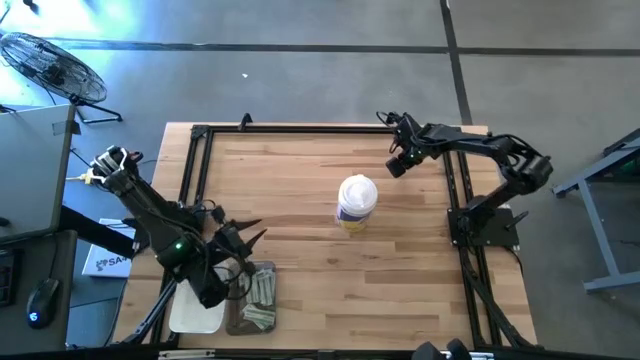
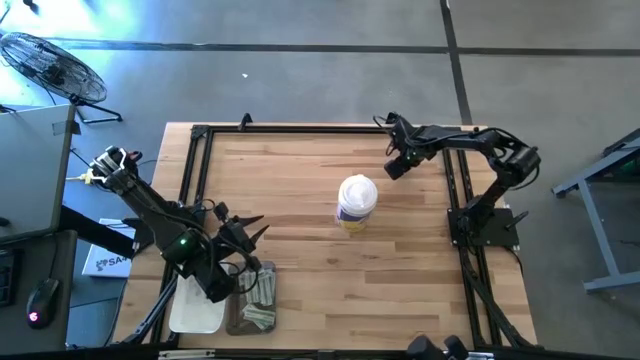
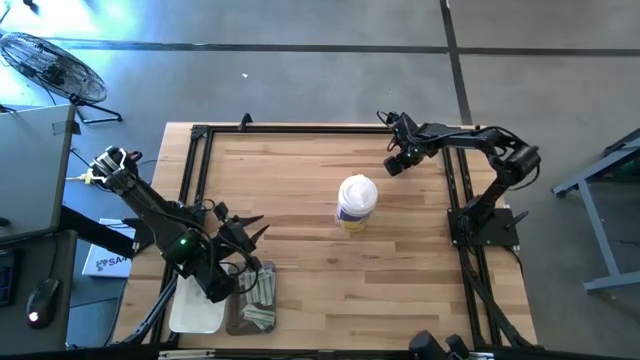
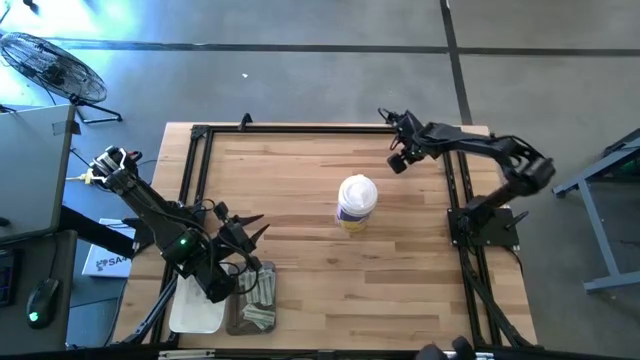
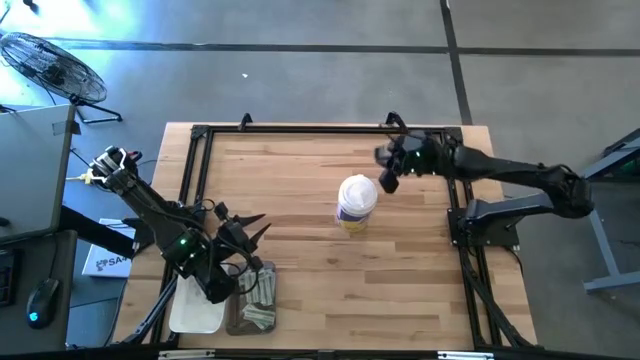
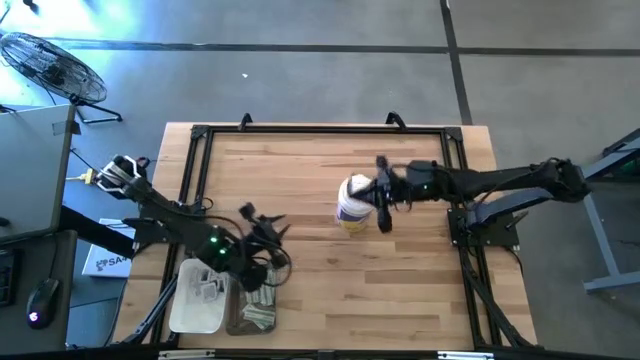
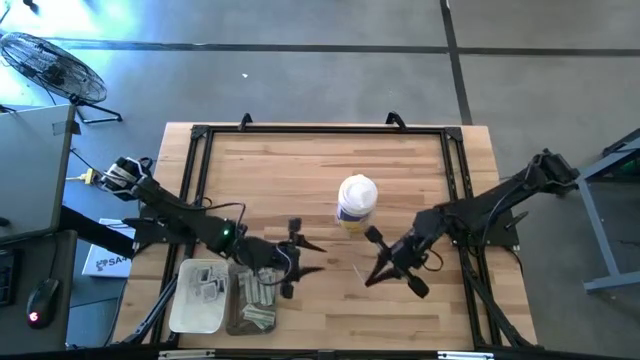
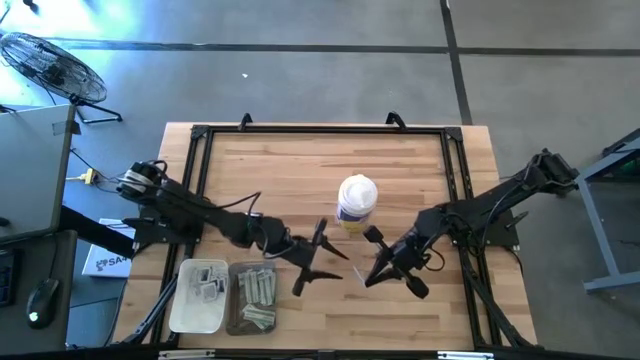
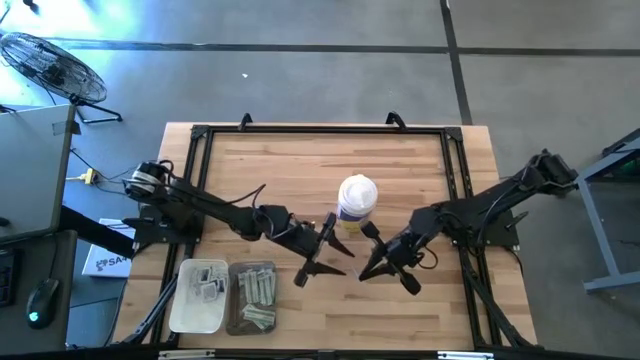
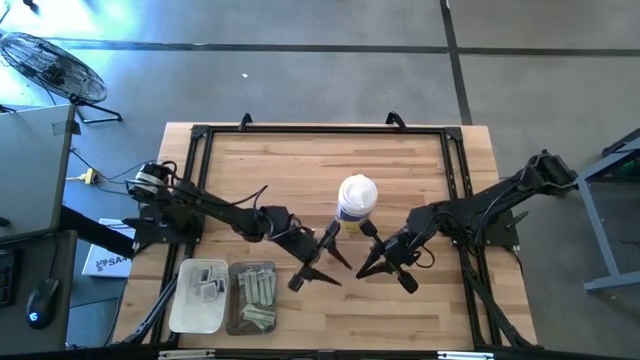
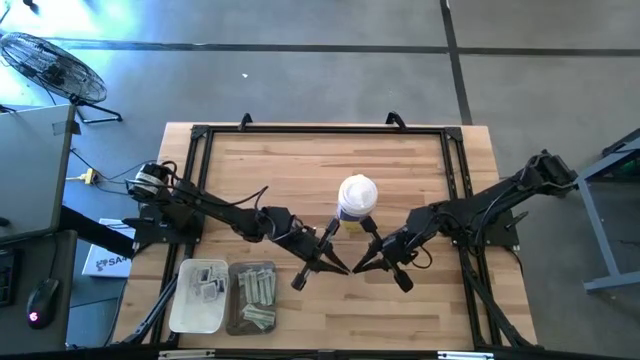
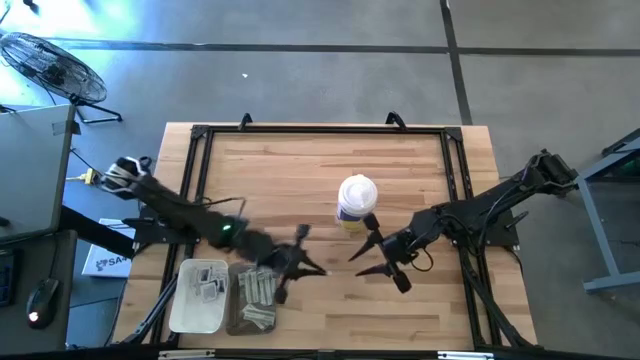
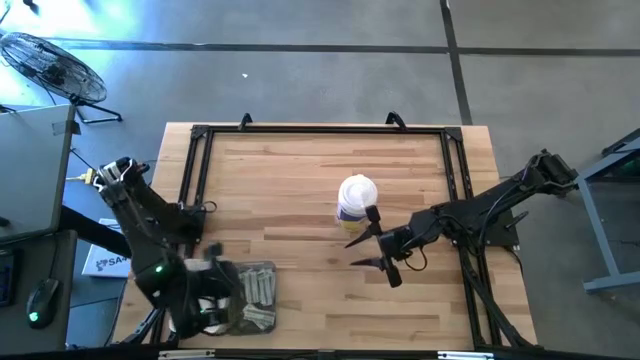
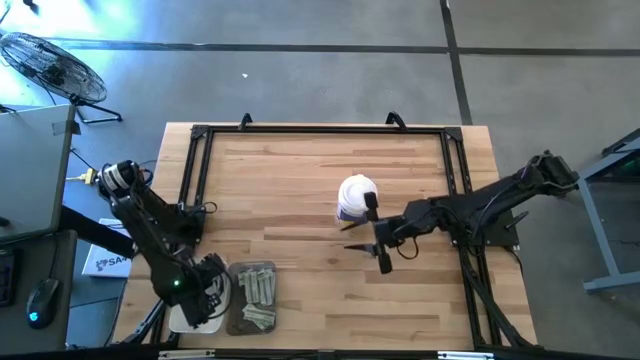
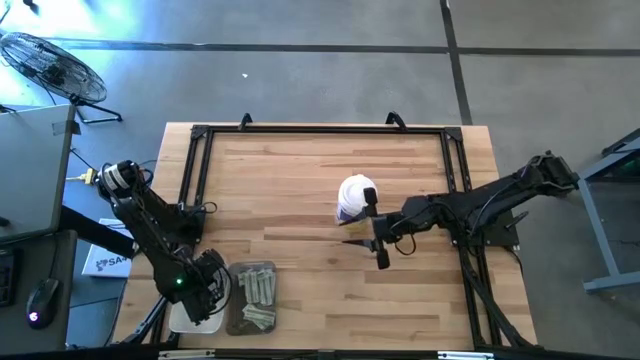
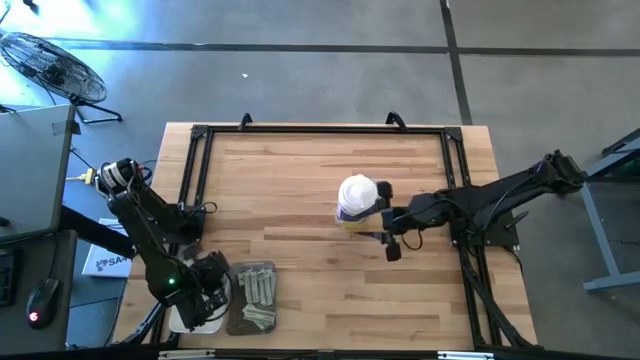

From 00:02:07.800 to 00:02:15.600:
Task: Pick & Place First Aid Supplies
Put the alcohol pad into the white bin

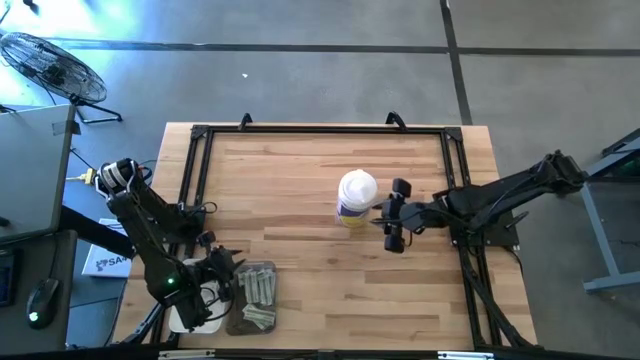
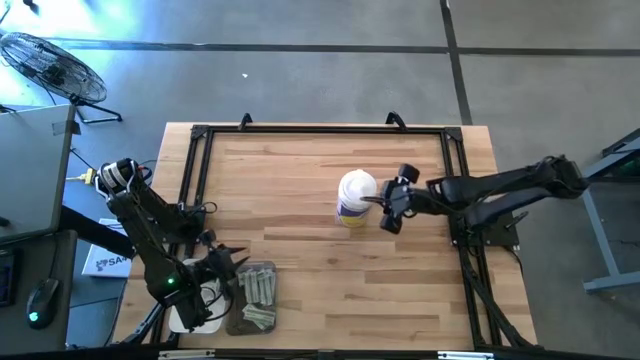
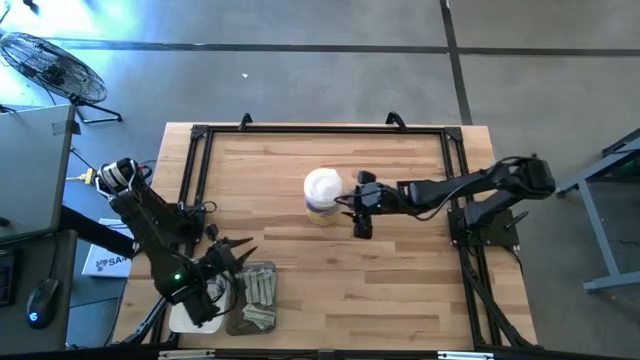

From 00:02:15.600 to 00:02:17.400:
Move the cylindrical object to the center

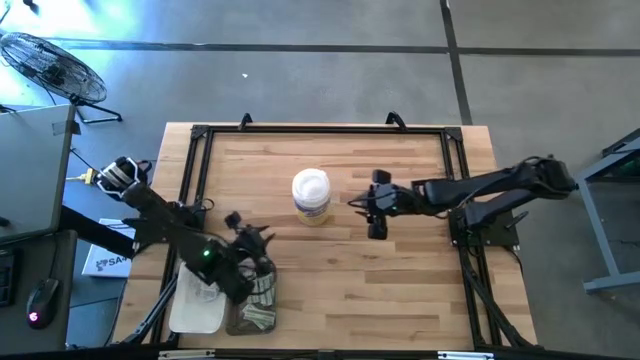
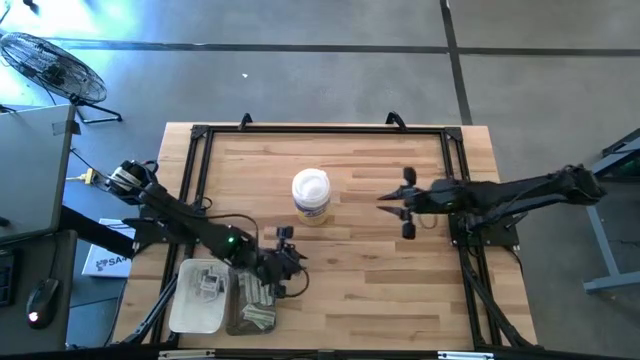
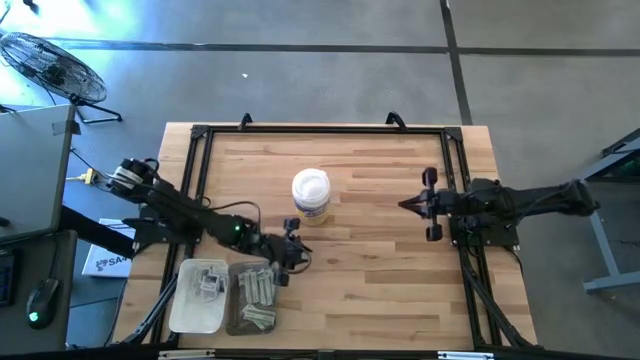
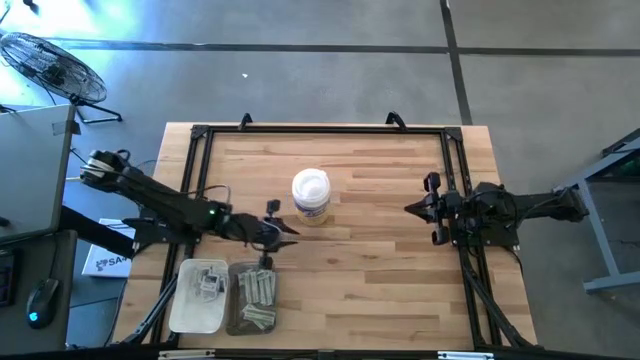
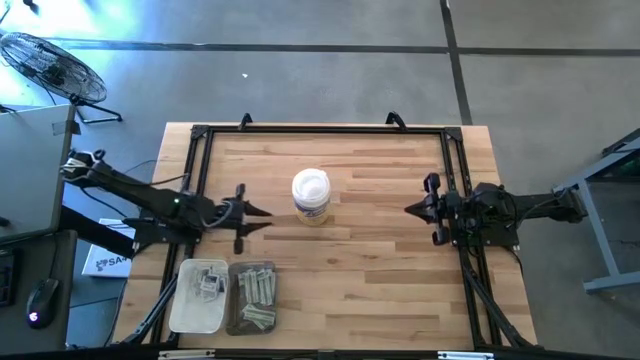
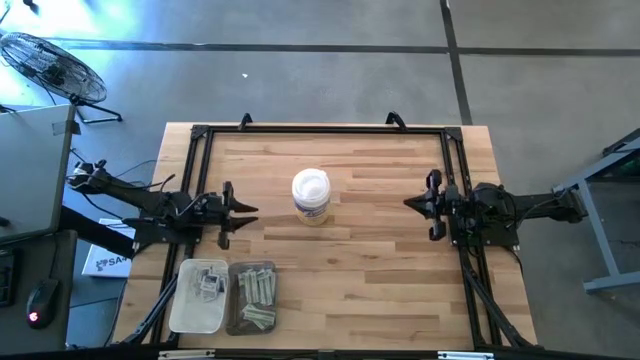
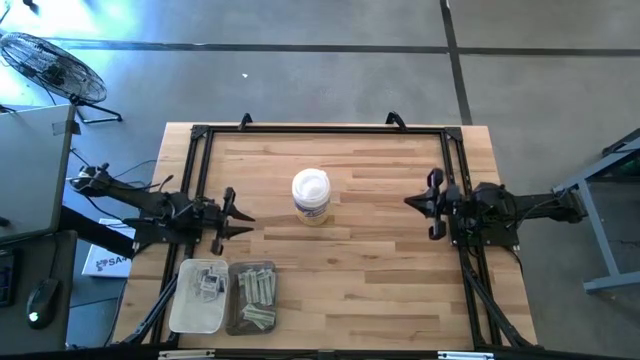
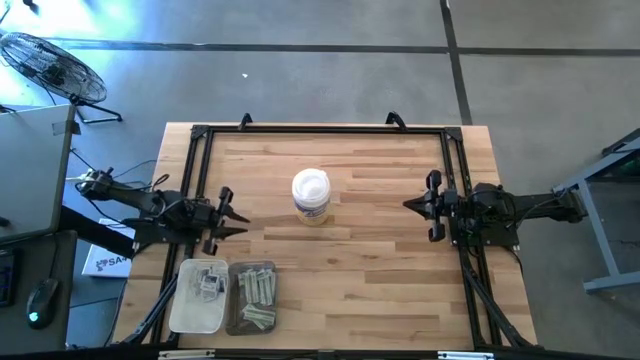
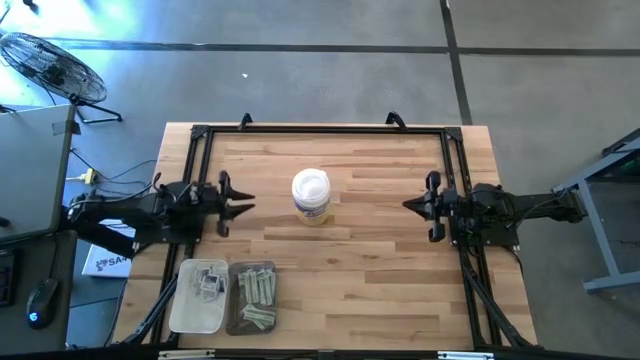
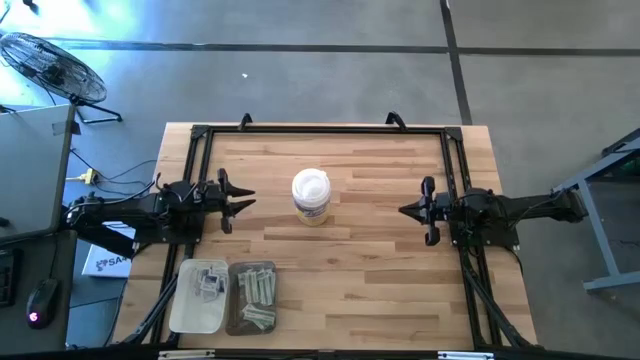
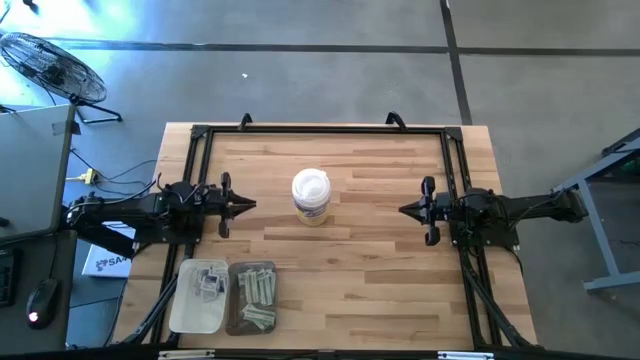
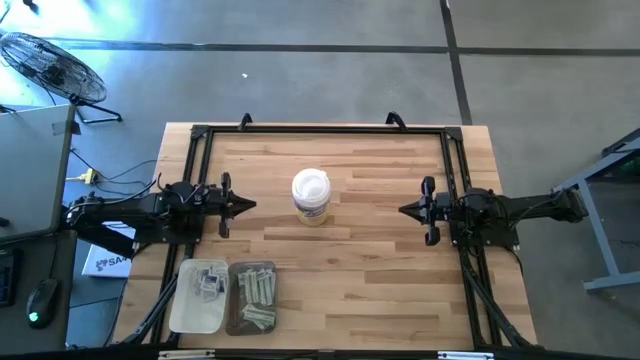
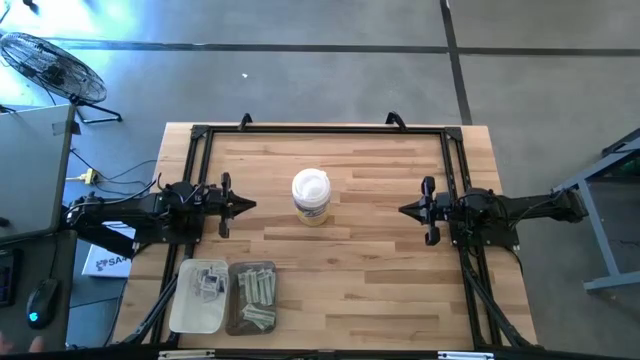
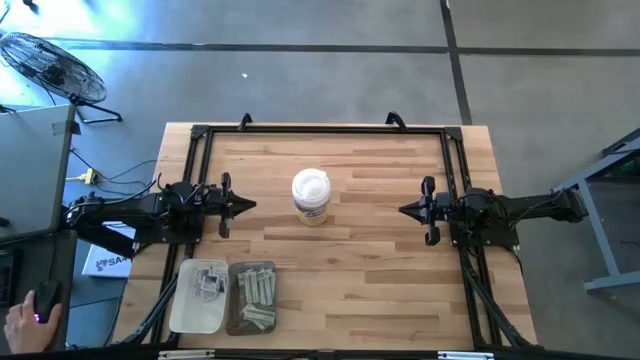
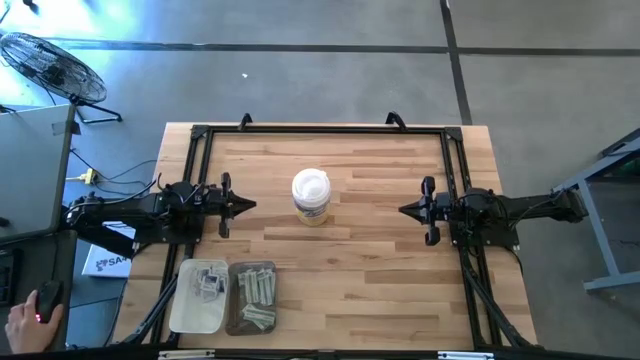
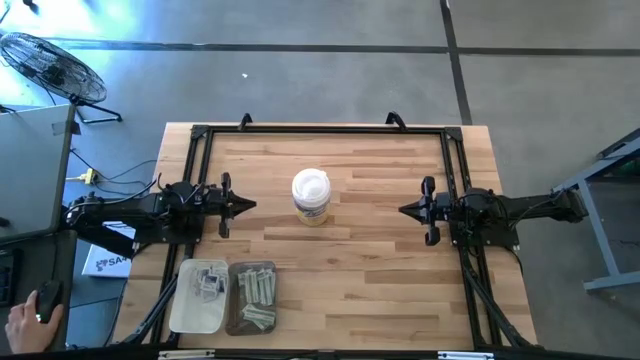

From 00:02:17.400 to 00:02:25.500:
Return to Home Position

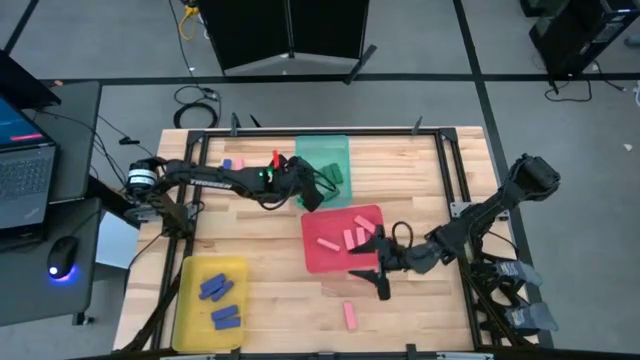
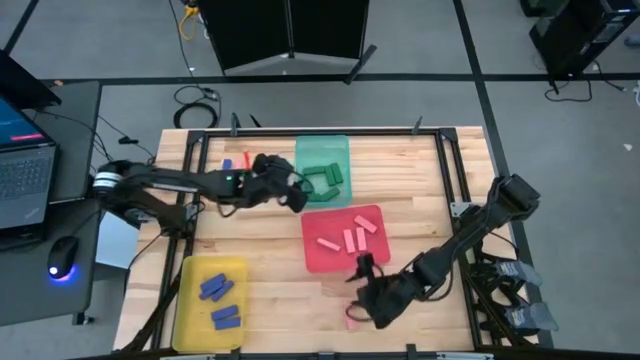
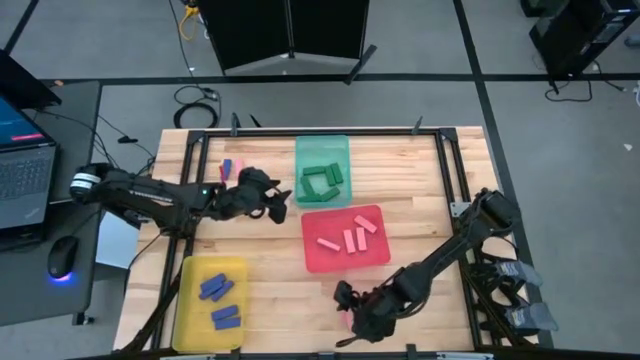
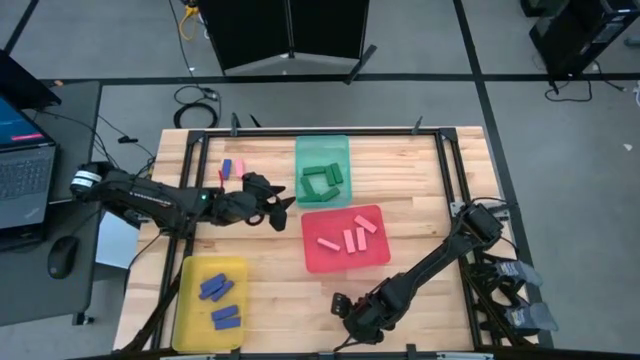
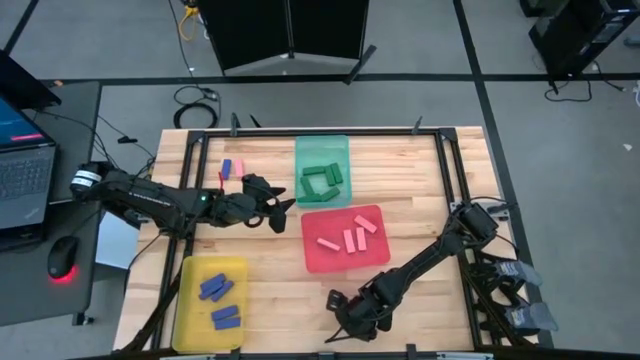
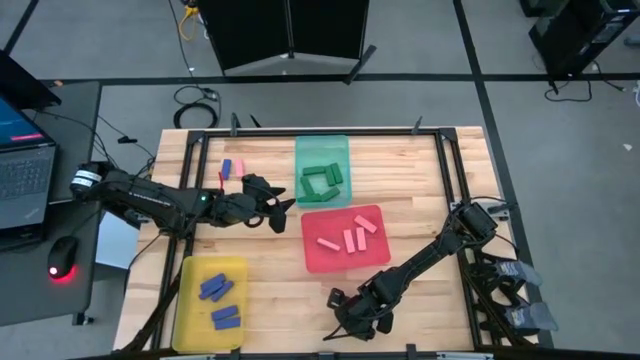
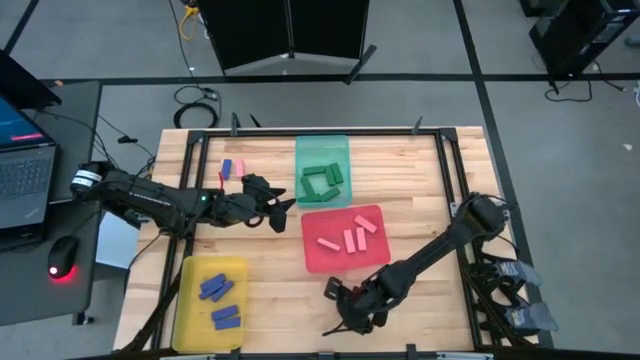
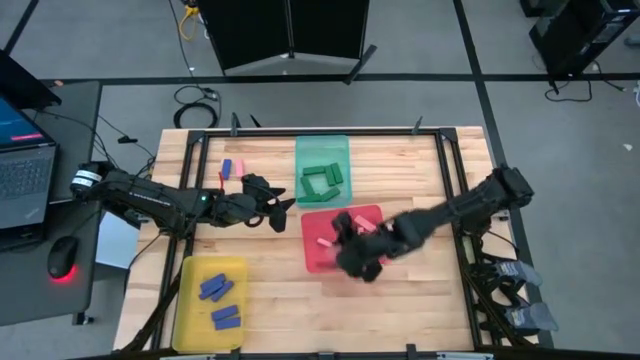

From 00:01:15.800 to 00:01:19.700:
Task: Sort blocks
Put the pink block into the pink bin
